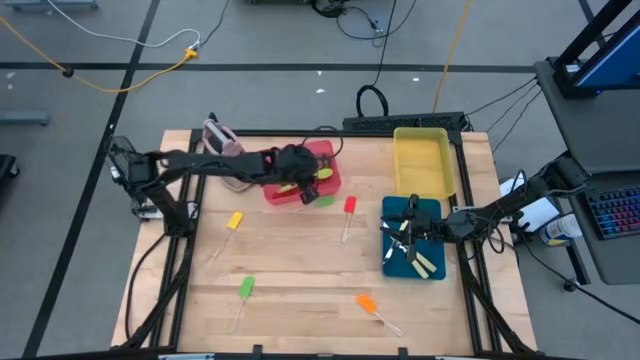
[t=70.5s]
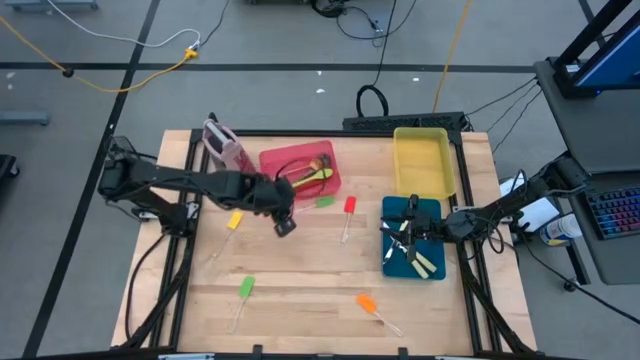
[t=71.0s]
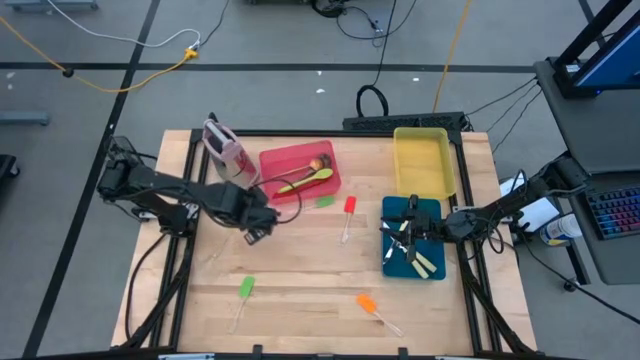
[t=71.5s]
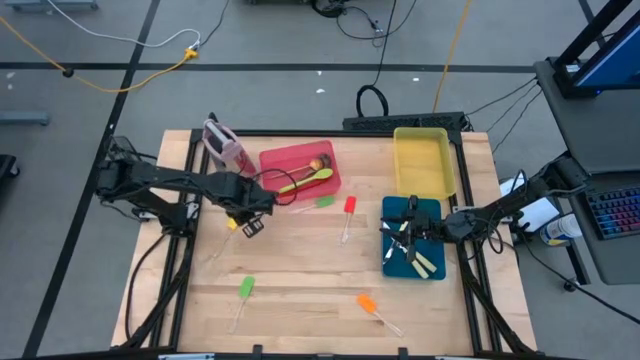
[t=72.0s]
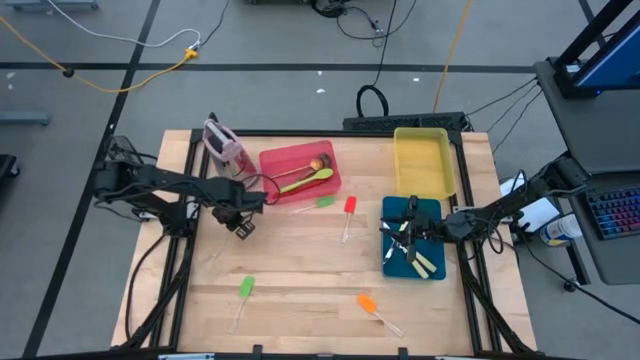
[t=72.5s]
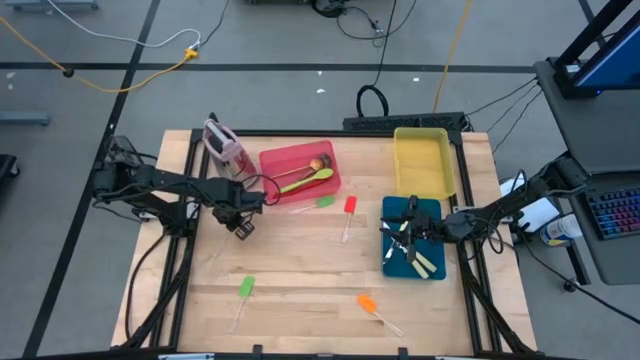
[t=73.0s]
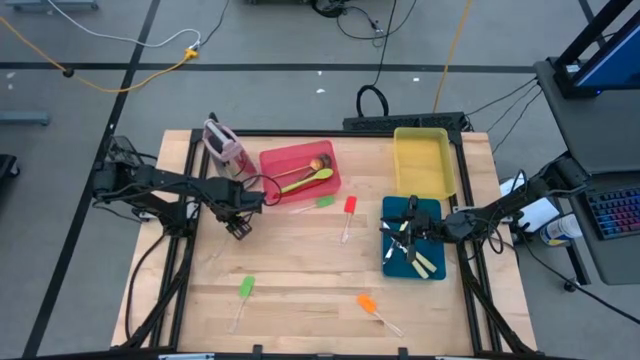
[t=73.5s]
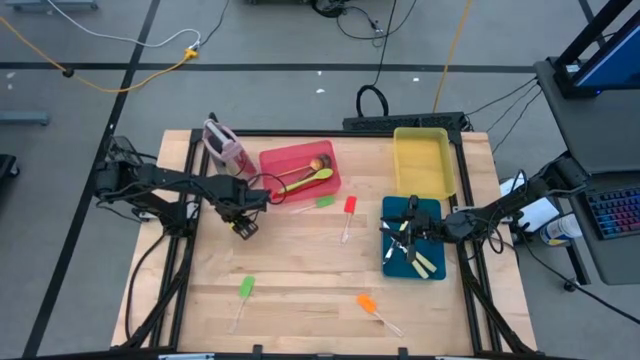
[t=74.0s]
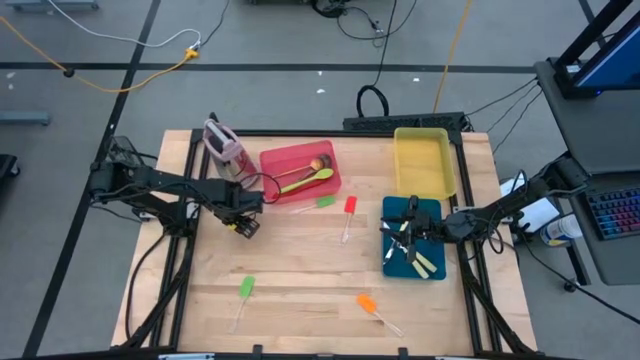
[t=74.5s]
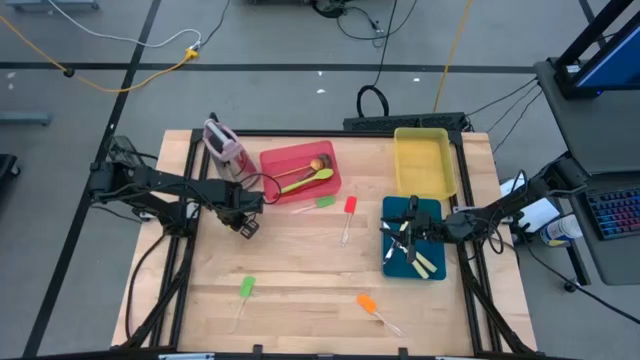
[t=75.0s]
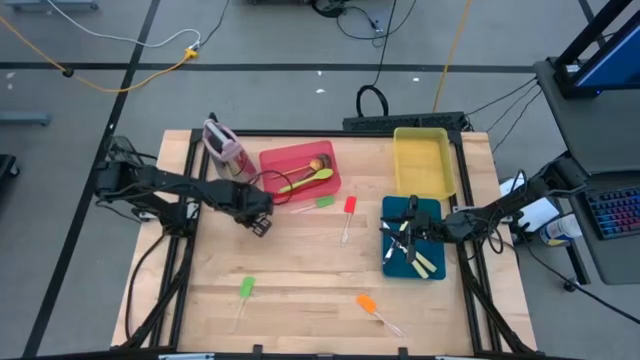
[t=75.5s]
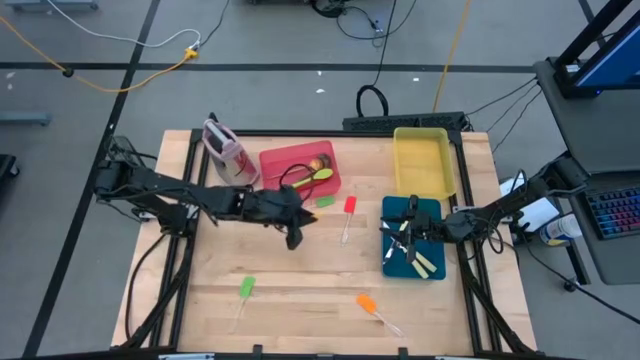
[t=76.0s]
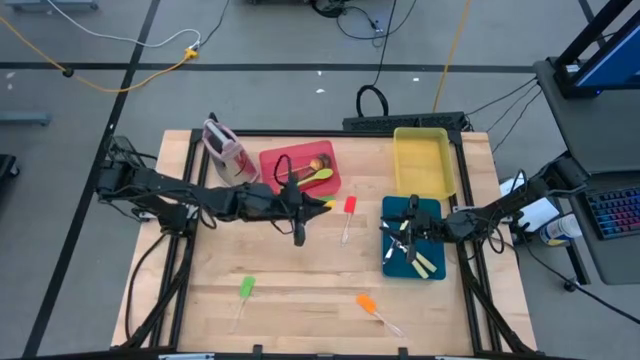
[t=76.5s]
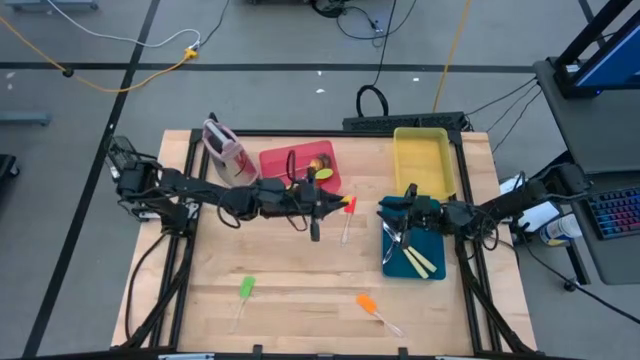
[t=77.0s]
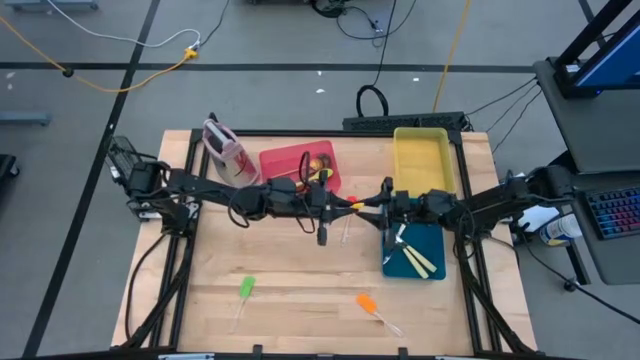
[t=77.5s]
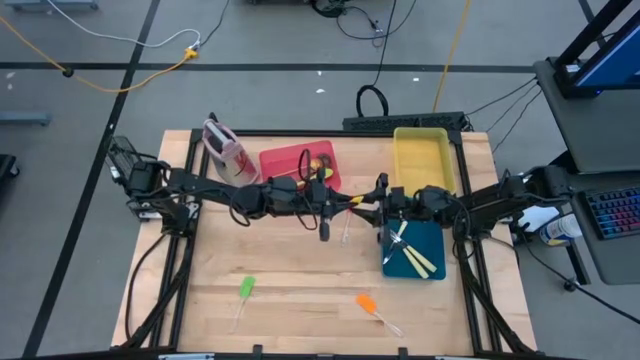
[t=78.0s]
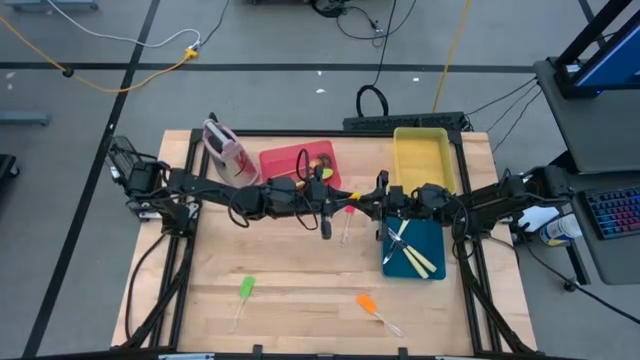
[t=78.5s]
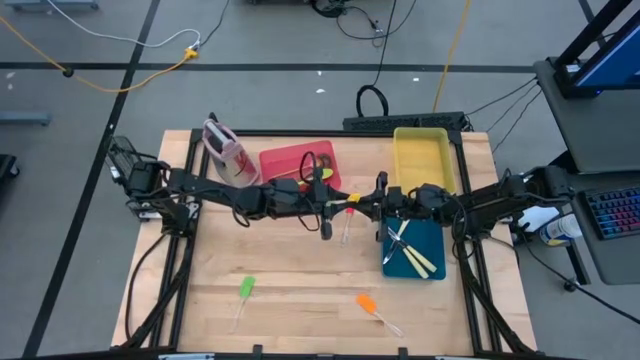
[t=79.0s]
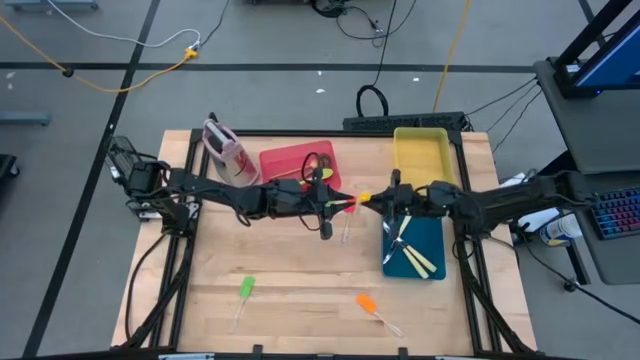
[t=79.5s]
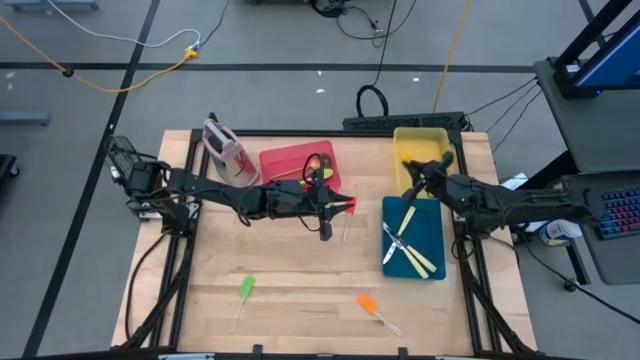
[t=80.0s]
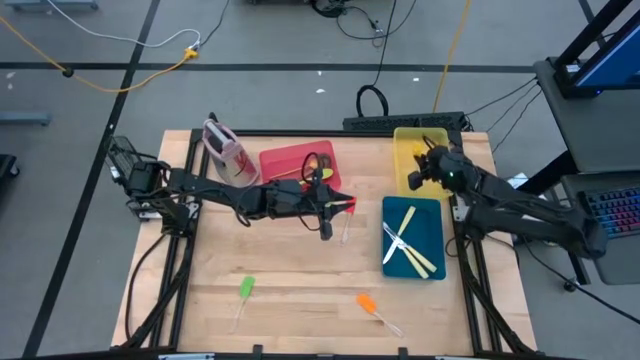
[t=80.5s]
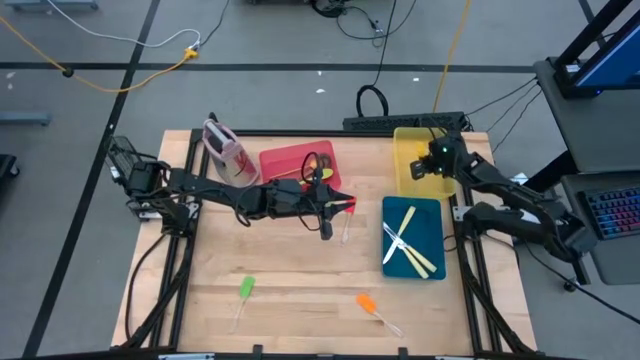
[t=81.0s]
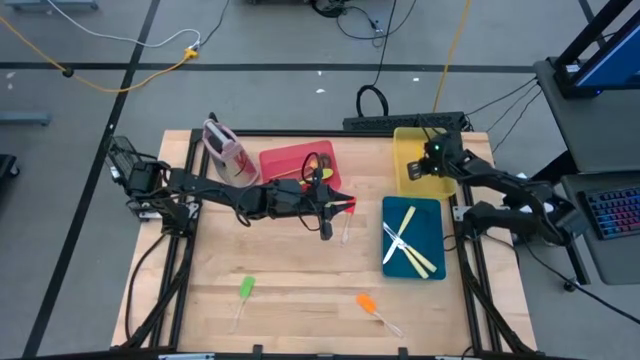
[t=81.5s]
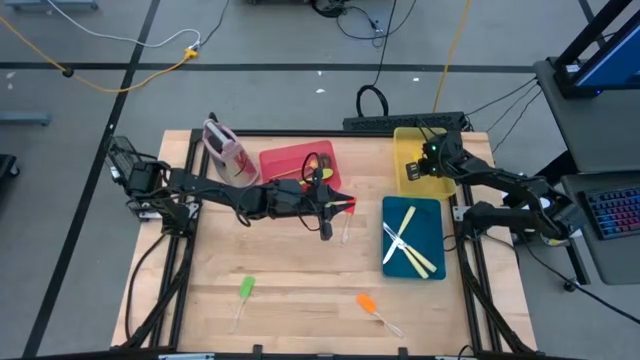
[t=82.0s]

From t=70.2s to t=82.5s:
Task: Pick & Place Kitchen Items
Put the yellow spatula into the yellow bin

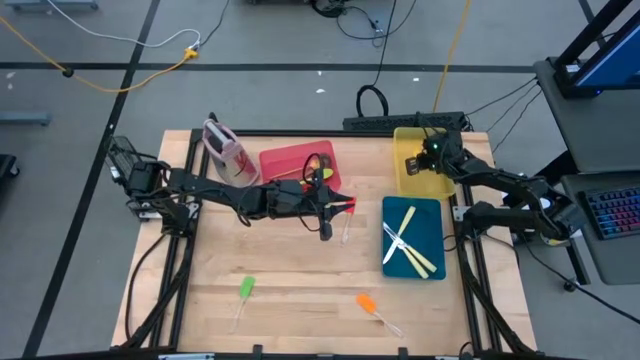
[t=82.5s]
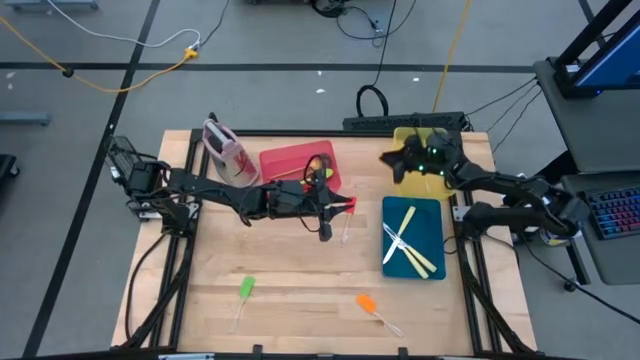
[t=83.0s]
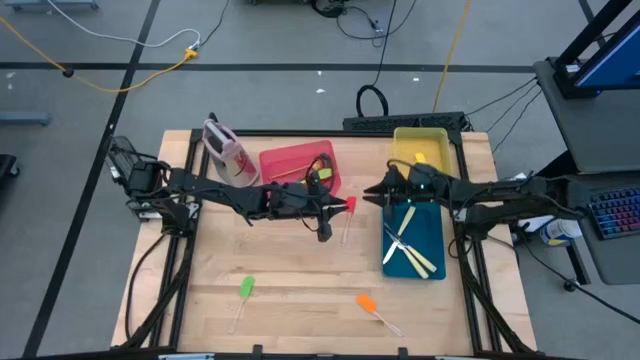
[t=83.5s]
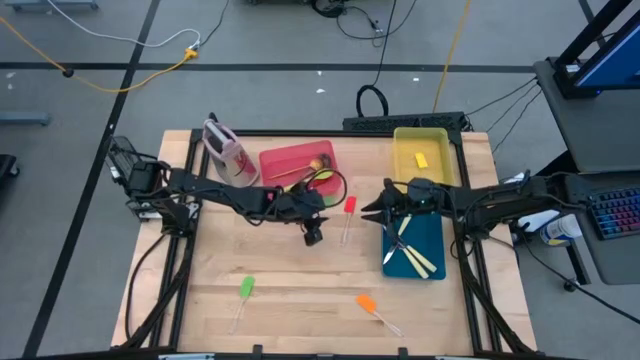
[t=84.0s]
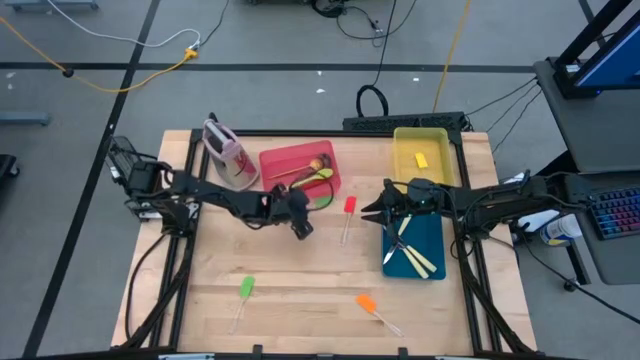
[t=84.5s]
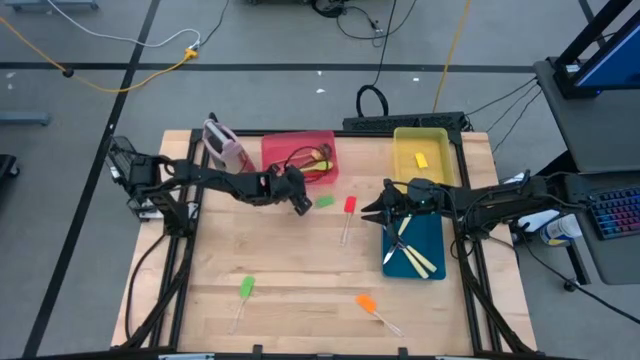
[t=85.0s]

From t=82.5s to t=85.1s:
Adjust the red bin to the top of the table

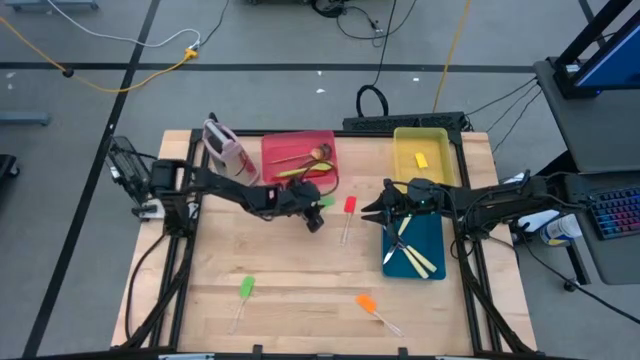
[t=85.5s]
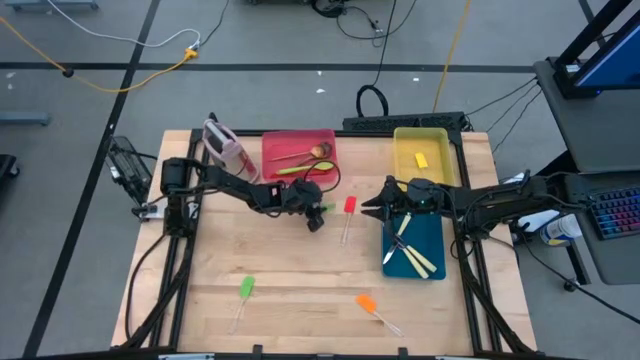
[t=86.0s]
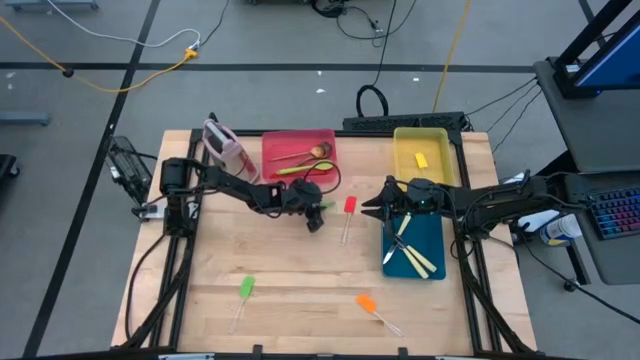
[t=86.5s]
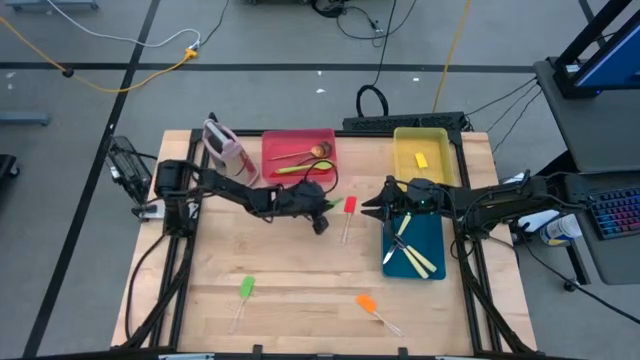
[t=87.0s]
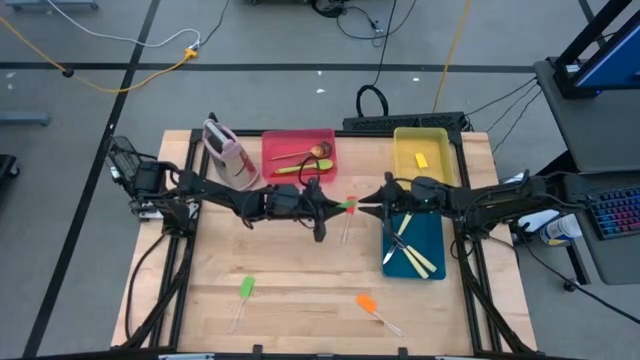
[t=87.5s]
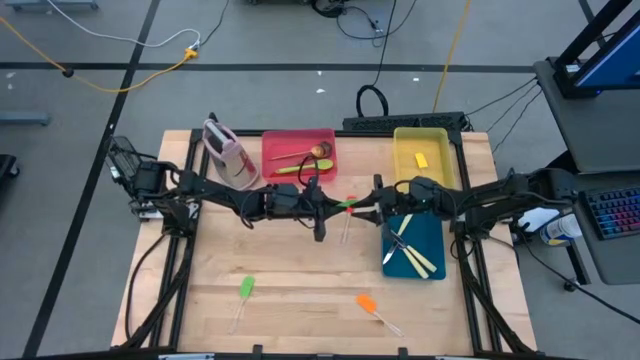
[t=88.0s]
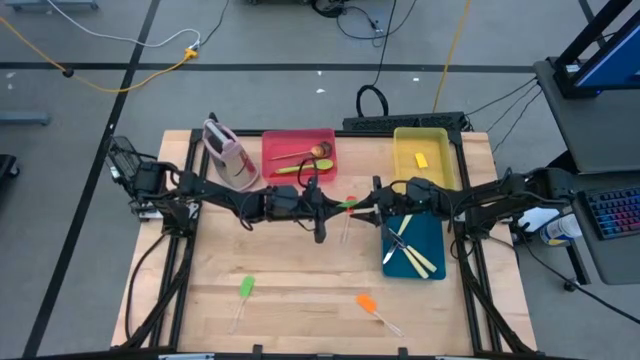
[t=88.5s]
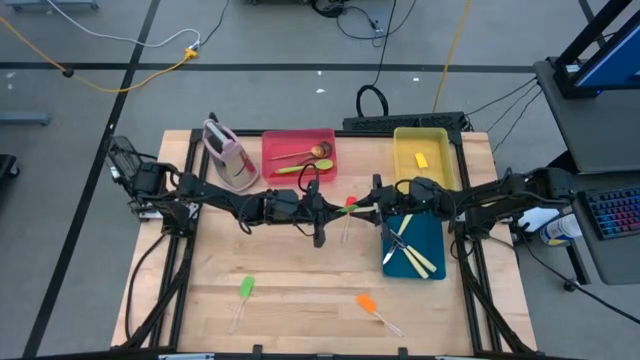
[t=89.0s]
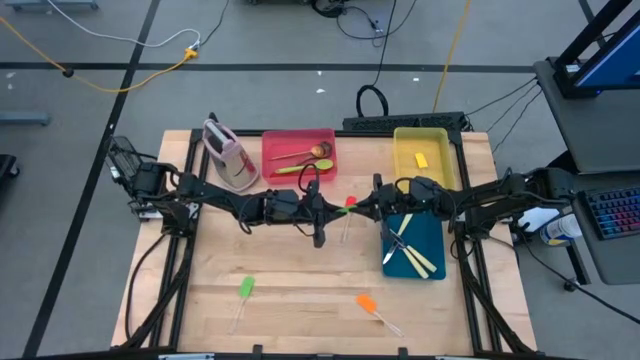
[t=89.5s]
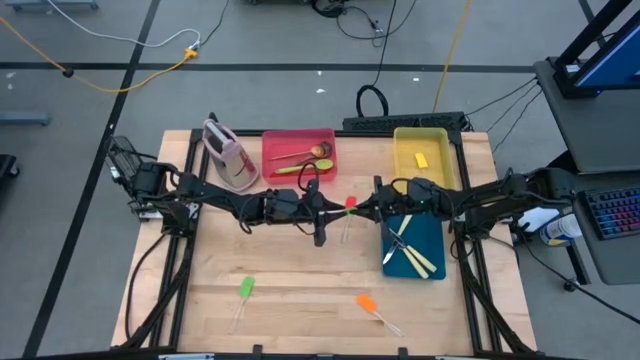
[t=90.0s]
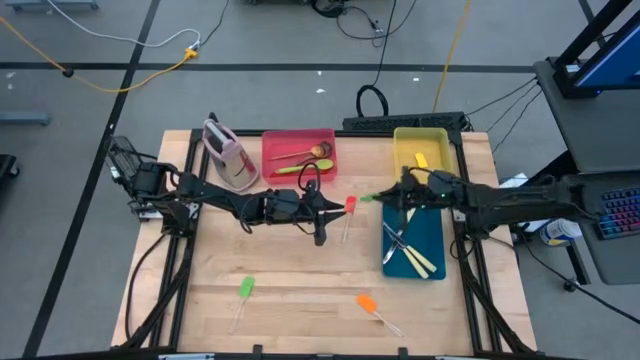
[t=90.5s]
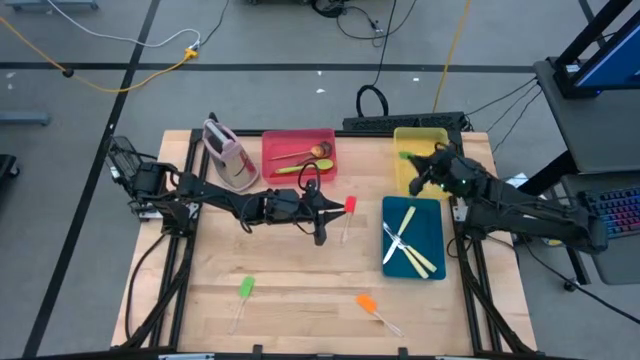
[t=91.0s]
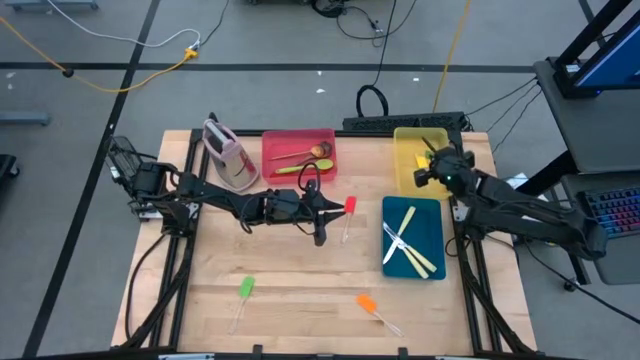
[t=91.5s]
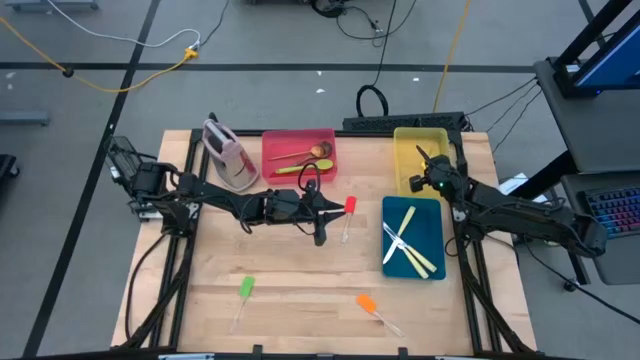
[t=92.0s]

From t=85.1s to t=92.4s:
Put the top green spatula into the yellow bin
